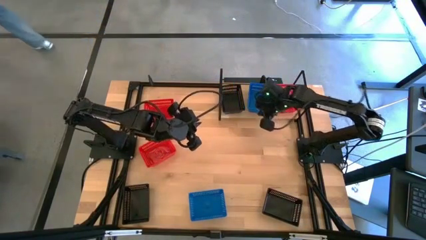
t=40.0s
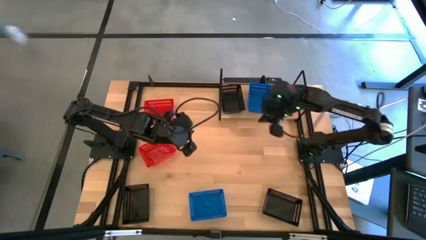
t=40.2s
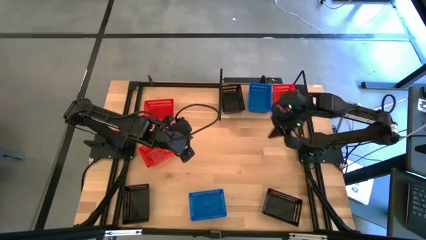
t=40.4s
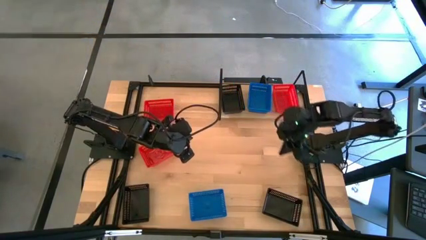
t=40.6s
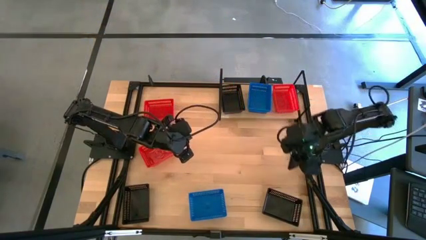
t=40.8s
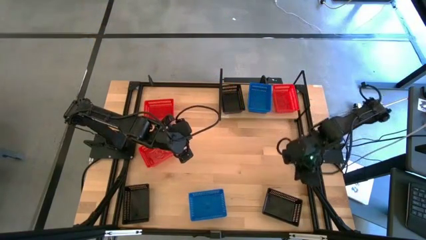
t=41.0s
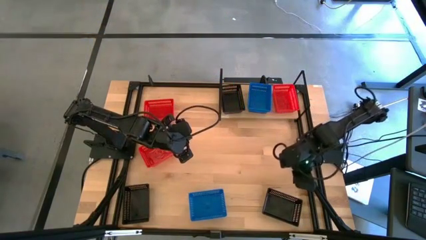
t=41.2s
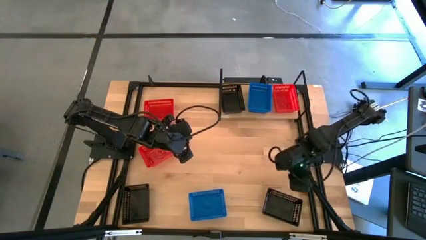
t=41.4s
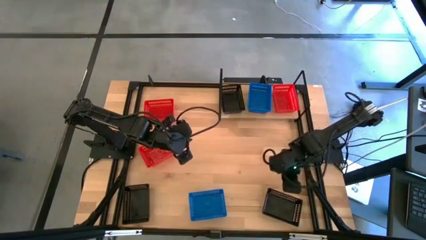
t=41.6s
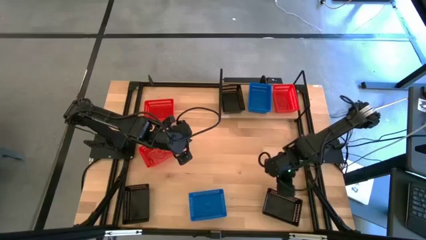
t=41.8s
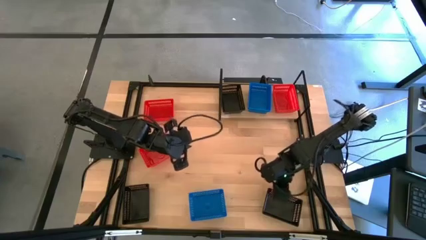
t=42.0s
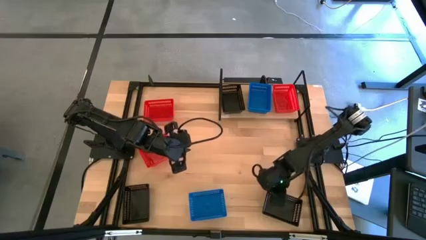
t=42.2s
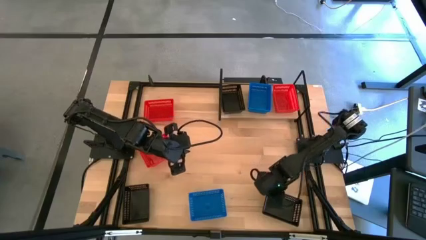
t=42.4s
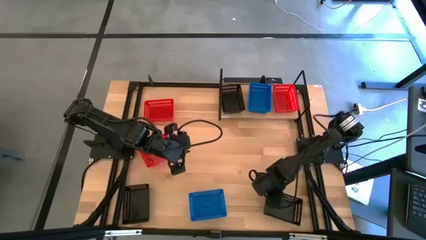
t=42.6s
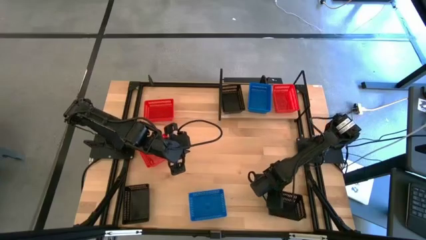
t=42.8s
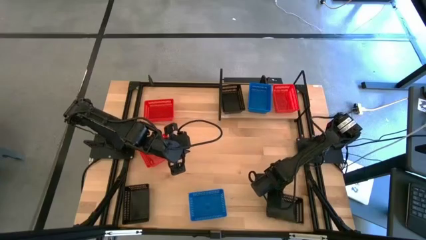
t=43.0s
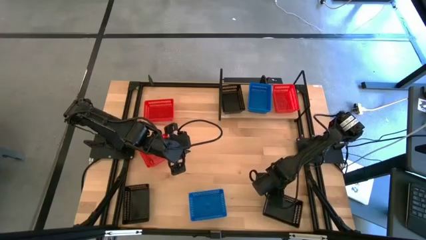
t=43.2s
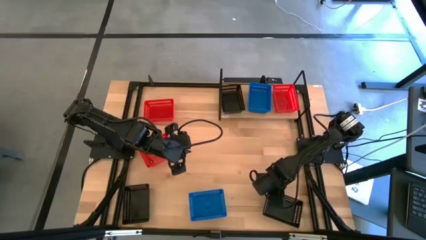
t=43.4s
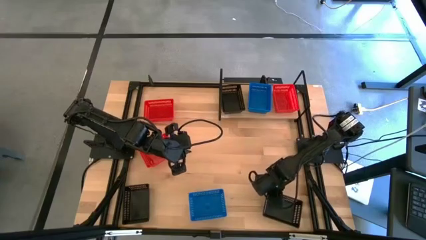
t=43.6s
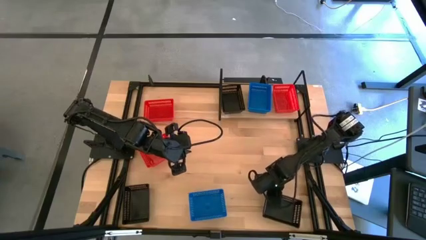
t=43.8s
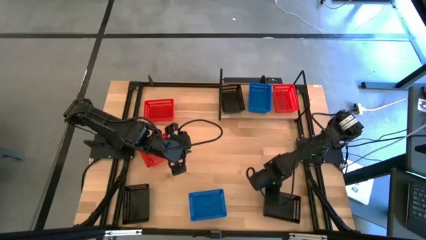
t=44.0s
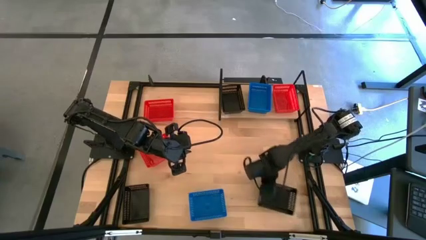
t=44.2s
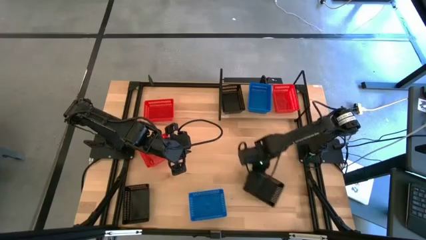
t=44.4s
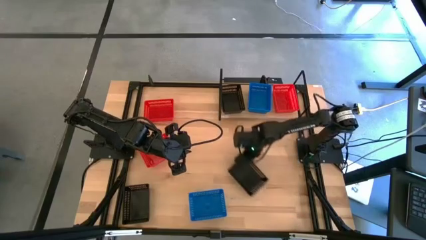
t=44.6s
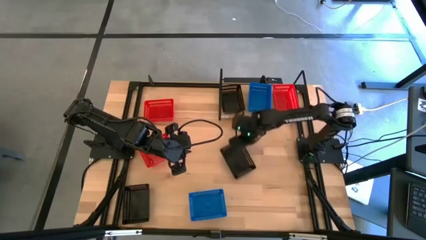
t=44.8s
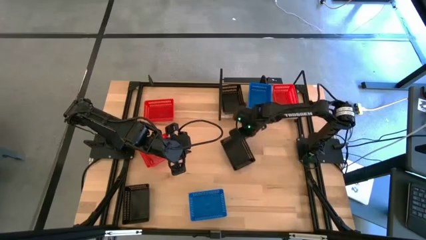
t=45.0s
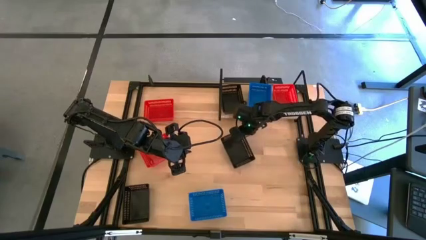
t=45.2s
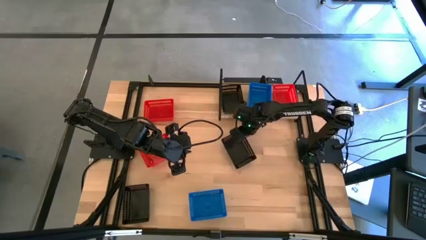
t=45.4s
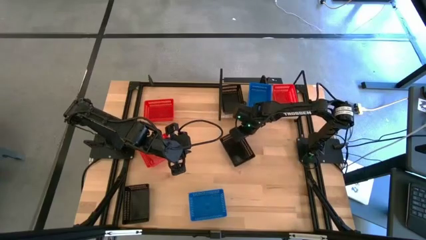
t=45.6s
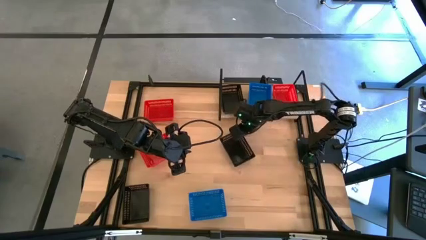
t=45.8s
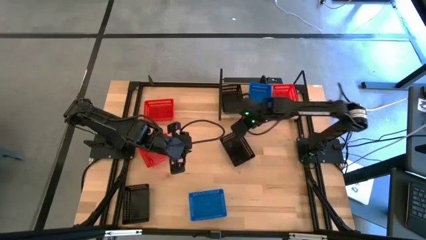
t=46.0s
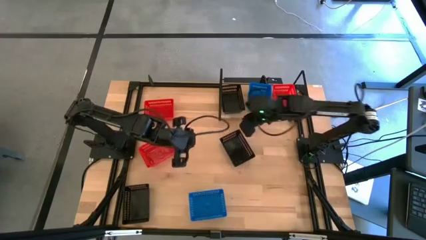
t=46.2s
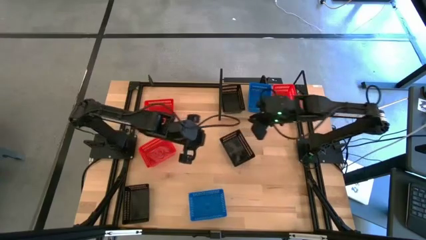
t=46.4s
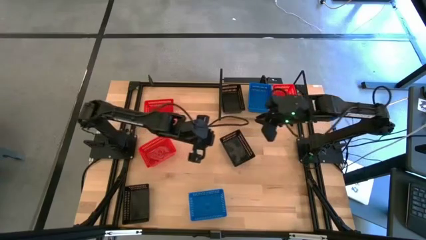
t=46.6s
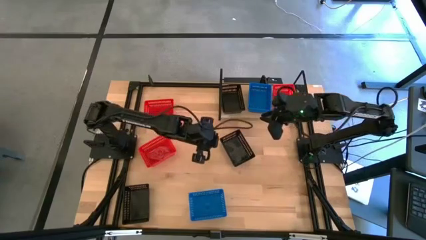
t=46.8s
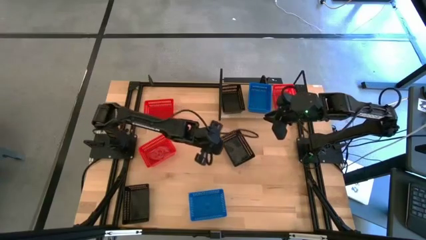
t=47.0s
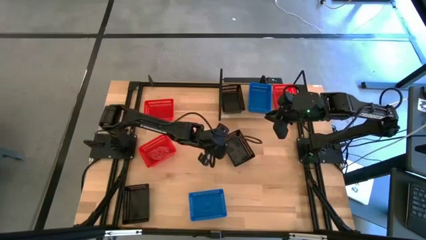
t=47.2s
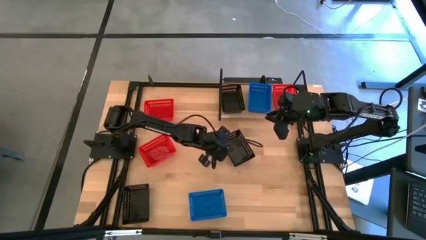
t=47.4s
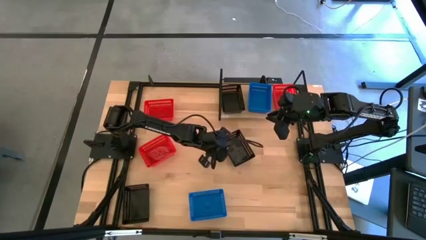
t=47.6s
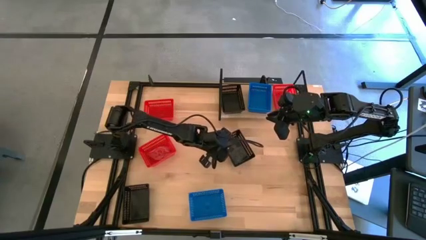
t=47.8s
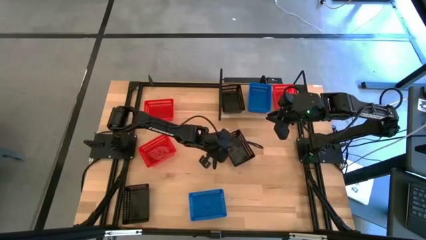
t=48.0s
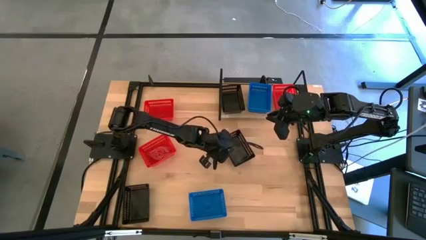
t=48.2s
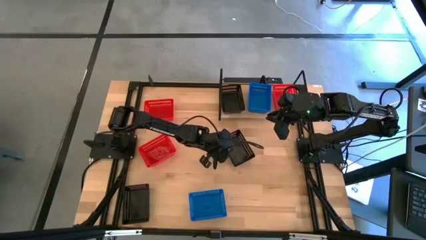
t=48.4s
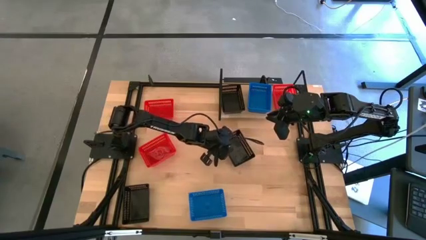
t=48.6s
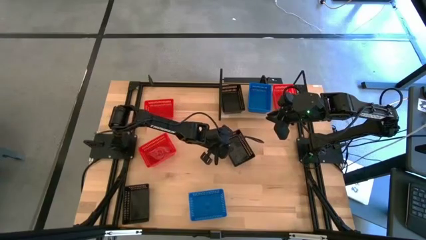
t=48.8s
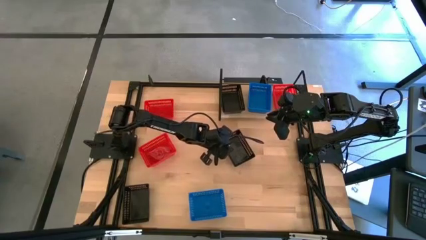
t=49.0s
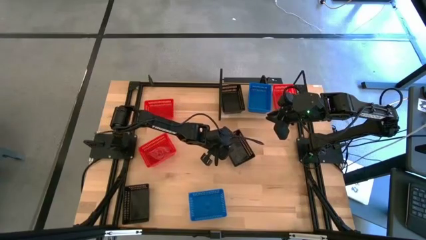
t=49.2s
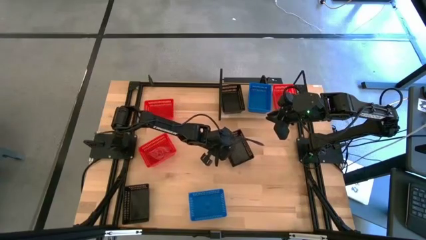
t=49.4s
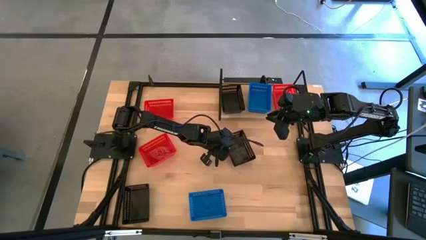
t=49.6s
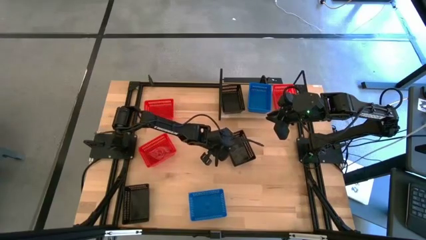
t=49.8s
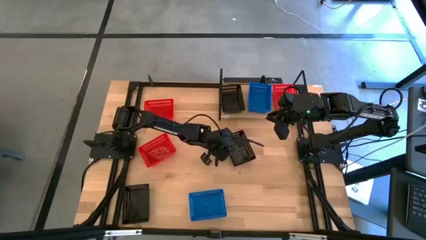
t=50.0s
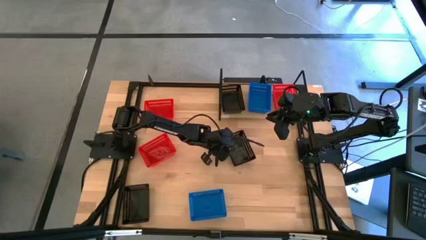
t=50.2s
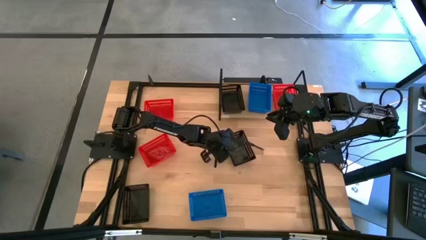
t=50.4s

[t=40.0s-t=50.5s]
Task: Stack baskets on shelf by color
Stack the right black bin on top of the other black bin on the shelf

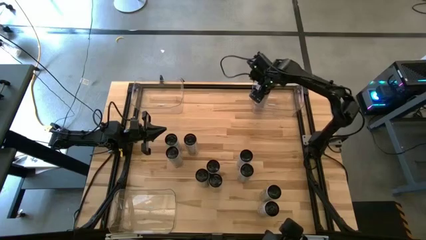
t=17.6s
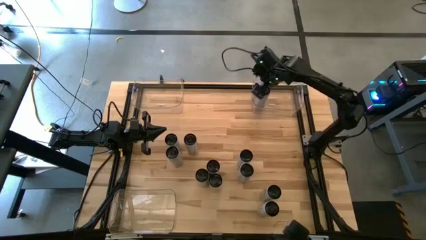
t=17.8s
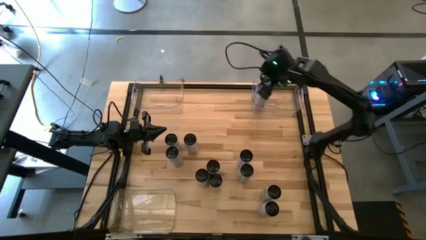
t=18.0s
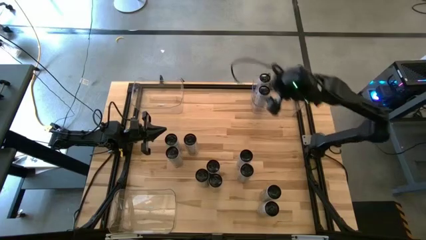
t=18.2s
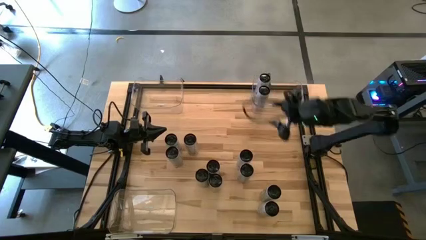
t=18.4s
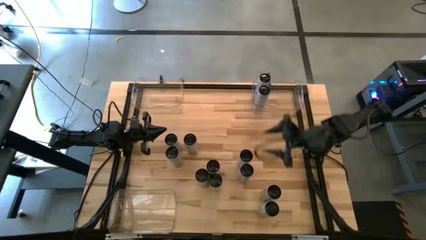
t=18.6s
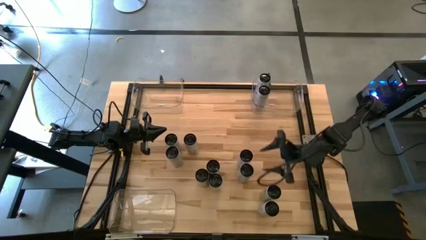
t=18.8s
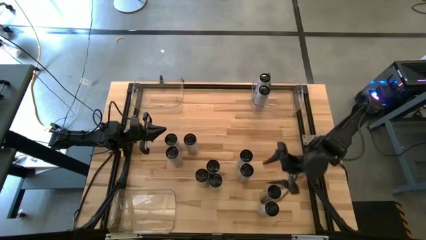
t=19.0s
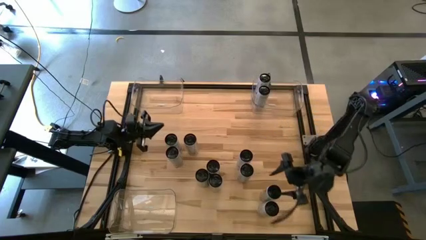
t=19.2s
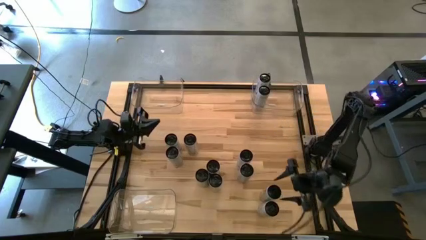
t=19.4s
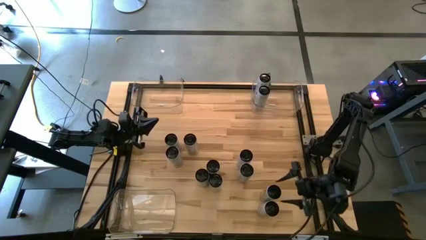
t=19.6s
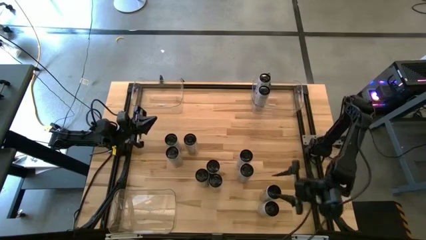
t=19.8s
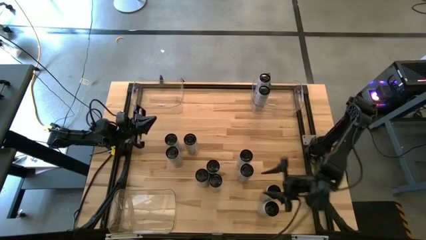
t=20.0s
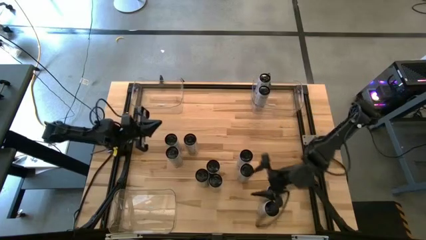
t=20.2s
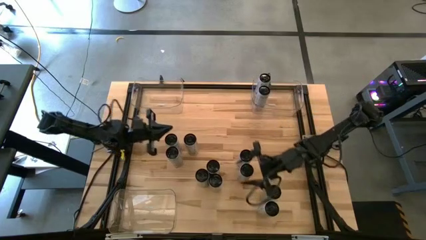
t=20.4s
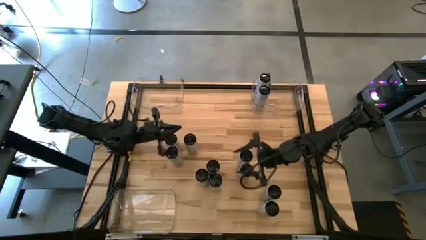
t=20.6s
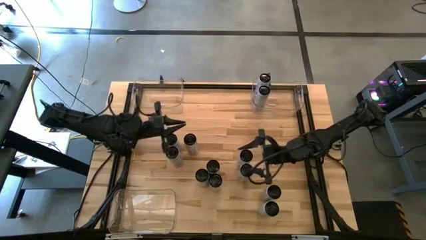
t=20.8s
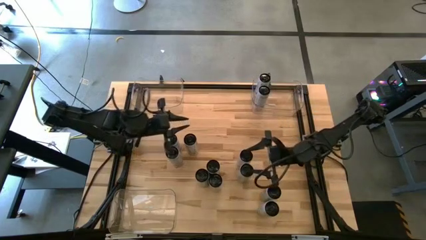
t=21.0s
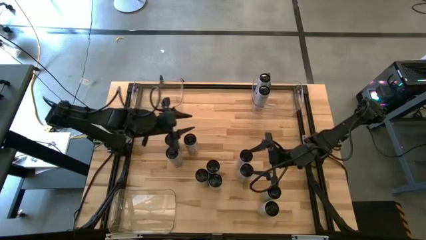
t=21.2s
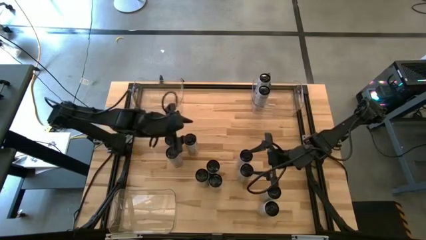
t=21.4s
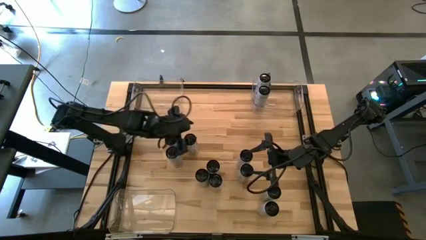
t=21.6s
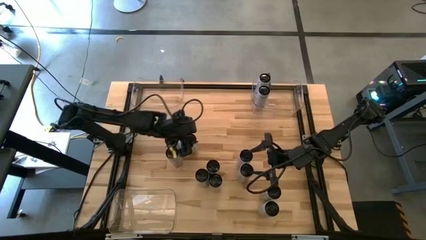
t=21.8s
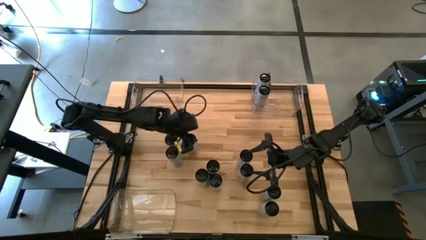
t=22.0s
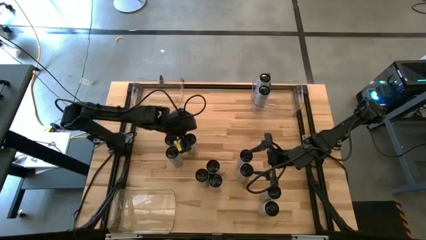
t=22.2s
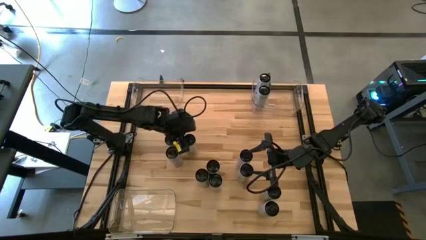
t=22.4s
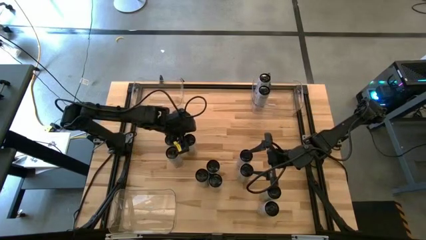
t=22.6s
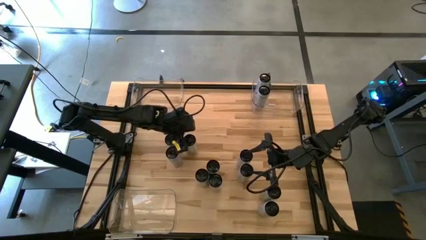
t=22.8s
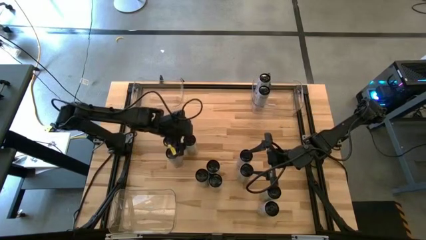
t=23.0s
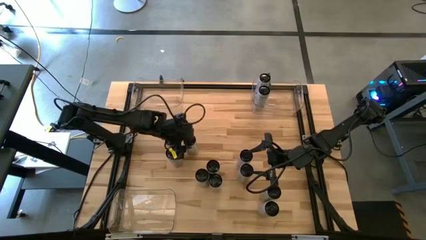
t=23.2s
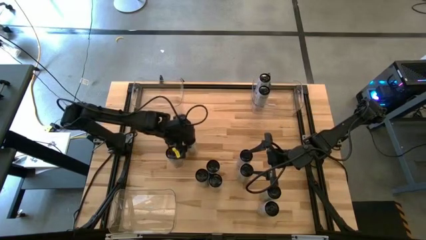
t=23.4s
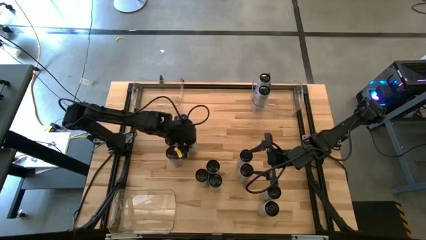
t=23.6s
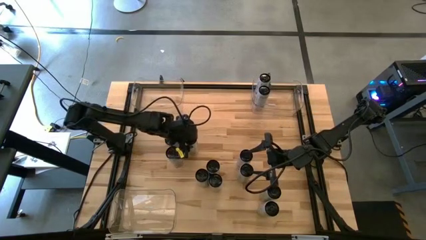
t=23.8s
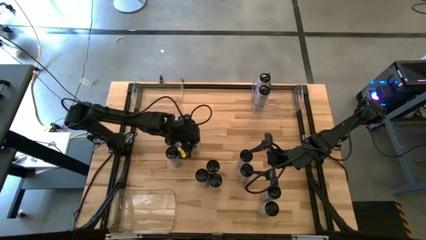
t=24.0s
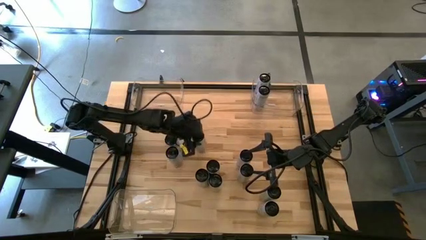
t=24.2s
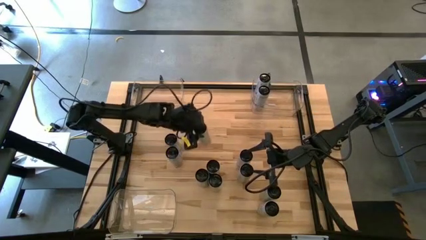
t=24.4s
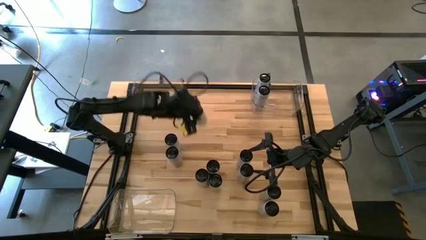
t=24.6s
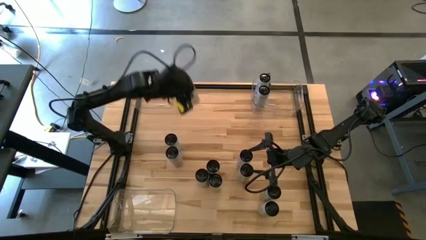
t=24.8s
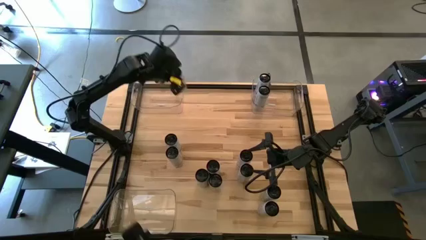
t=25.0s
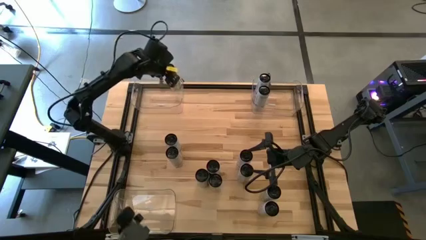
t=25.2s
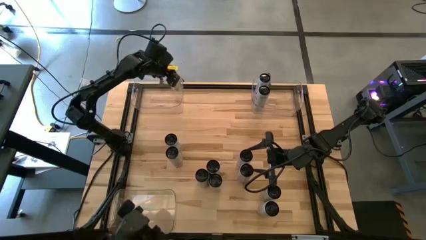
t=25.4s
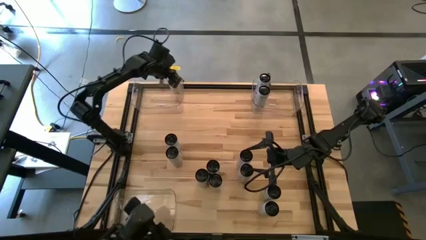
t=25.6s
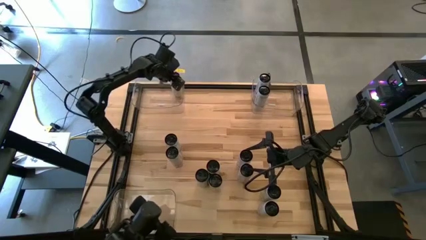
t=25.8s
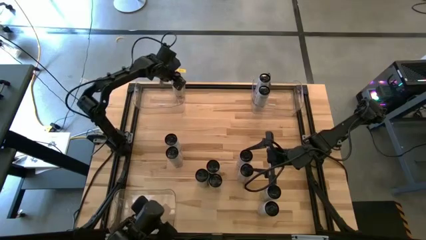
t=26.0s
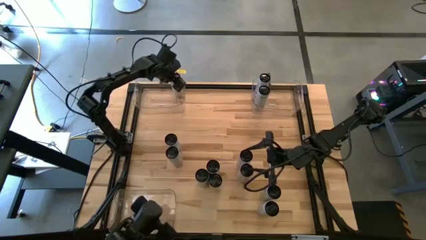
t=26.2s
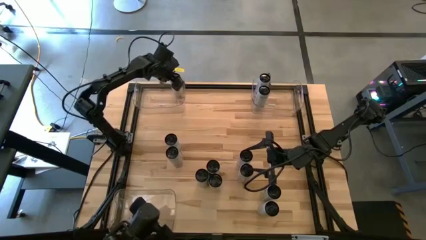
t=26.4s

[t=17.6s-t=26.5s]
Task: Sort soda cans
Put the white-yellow soda can into the top left transparent bin
